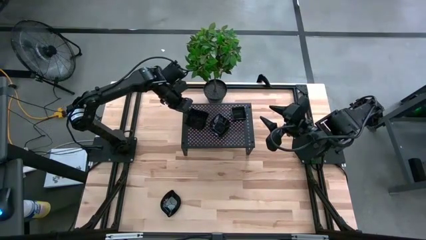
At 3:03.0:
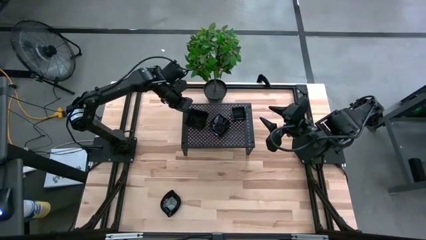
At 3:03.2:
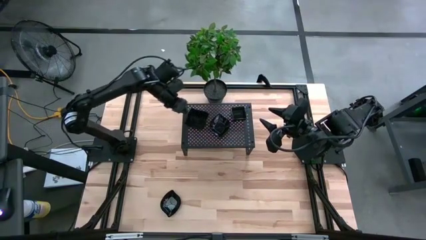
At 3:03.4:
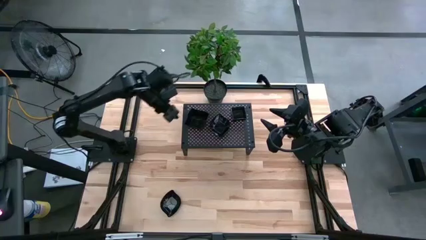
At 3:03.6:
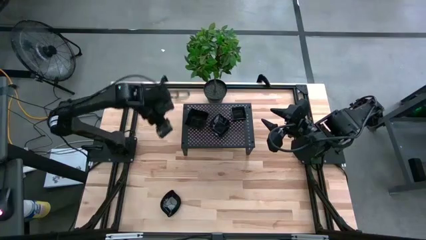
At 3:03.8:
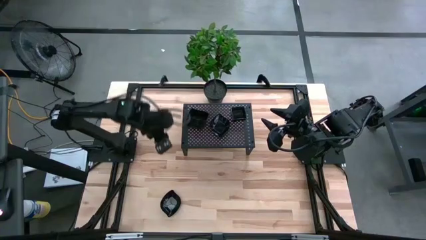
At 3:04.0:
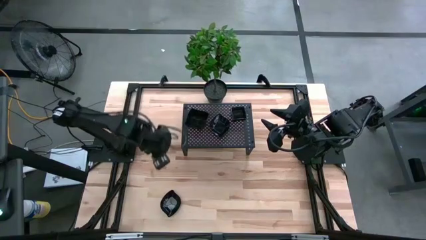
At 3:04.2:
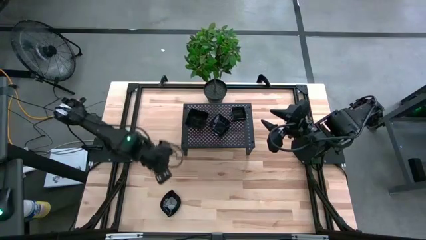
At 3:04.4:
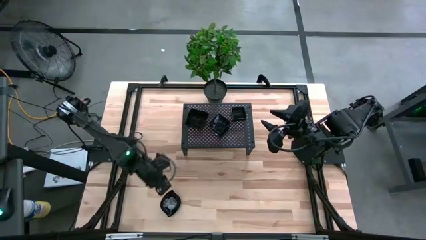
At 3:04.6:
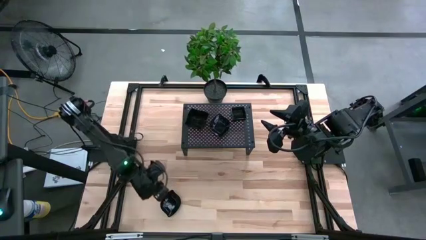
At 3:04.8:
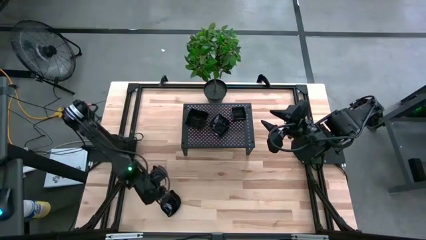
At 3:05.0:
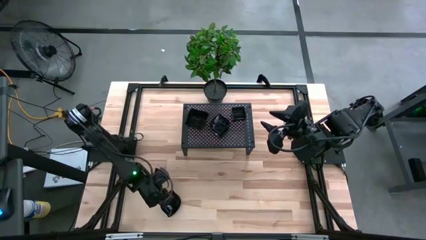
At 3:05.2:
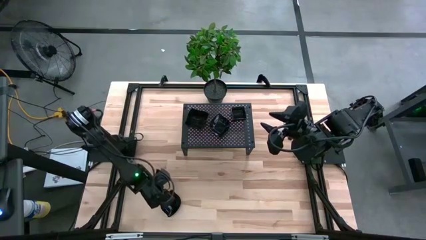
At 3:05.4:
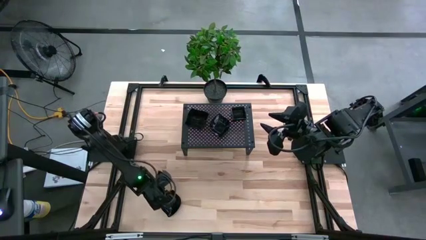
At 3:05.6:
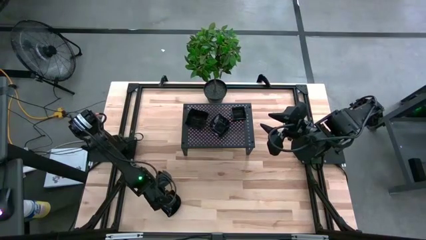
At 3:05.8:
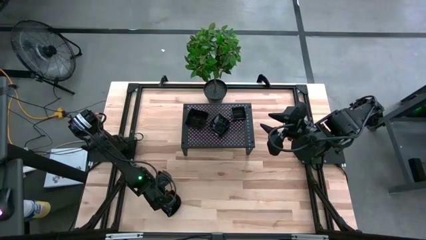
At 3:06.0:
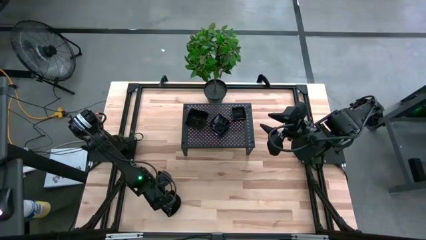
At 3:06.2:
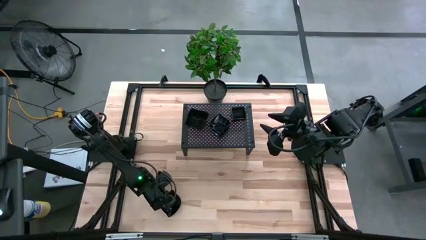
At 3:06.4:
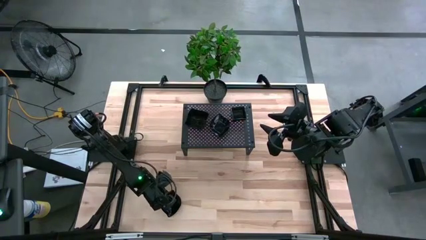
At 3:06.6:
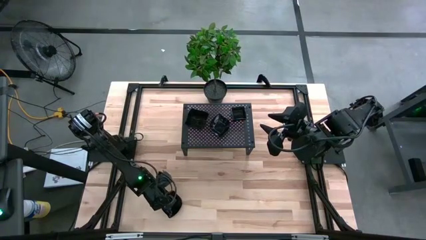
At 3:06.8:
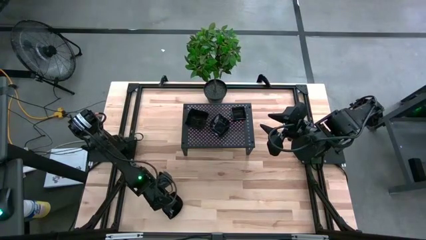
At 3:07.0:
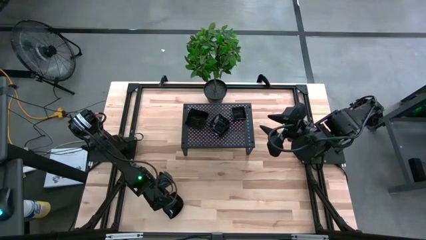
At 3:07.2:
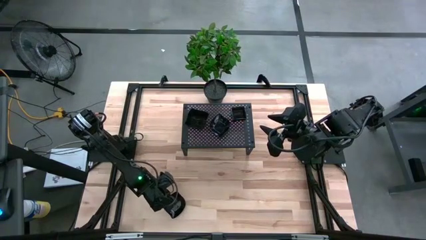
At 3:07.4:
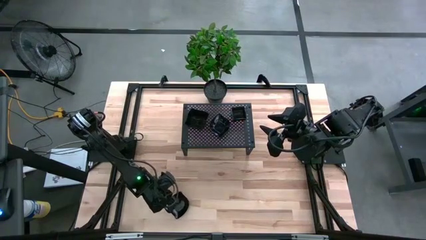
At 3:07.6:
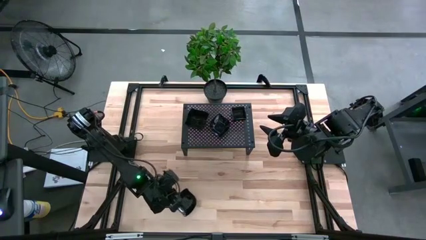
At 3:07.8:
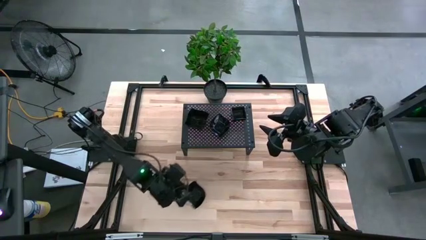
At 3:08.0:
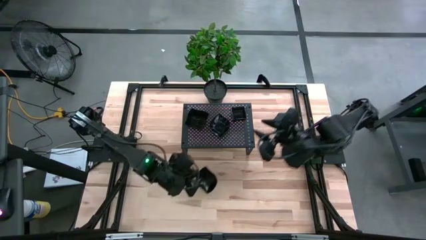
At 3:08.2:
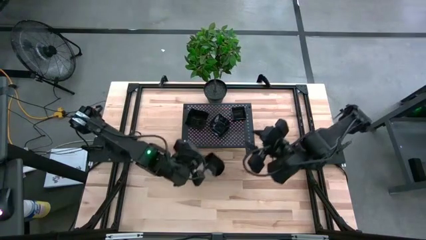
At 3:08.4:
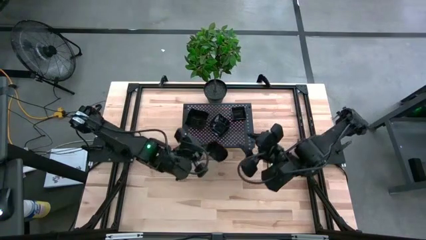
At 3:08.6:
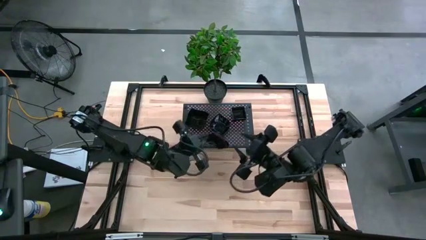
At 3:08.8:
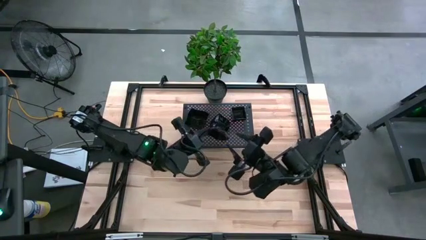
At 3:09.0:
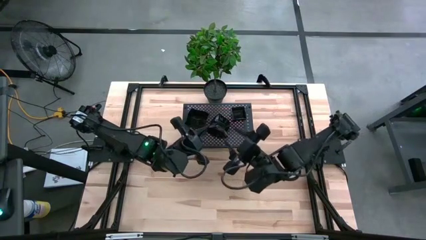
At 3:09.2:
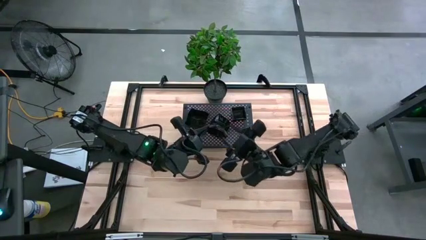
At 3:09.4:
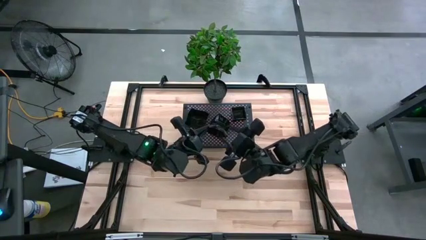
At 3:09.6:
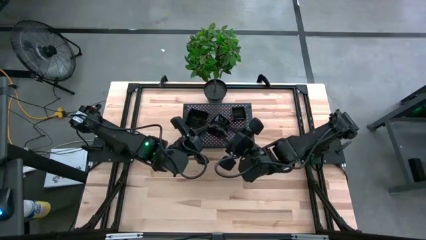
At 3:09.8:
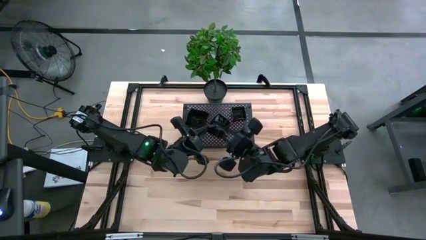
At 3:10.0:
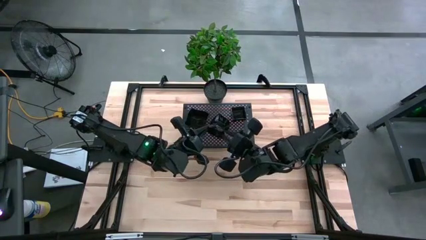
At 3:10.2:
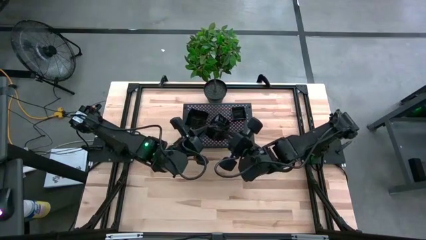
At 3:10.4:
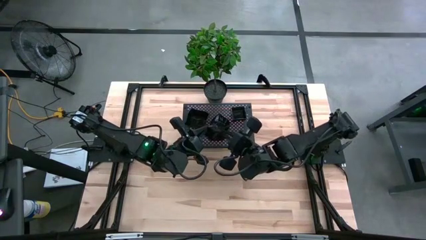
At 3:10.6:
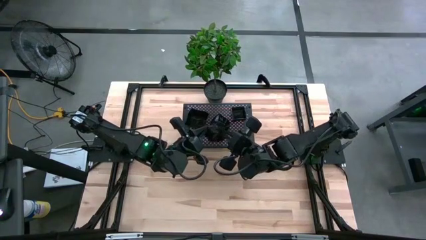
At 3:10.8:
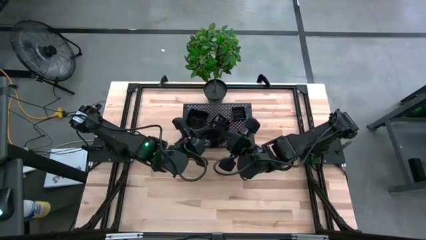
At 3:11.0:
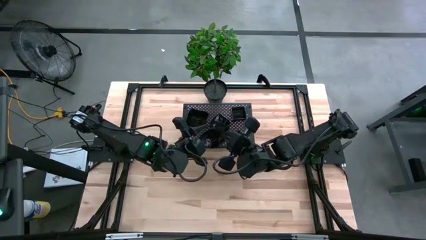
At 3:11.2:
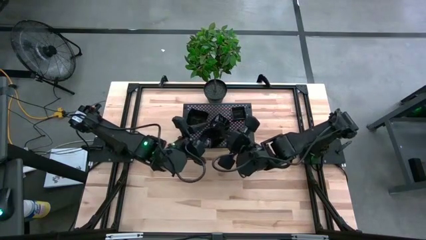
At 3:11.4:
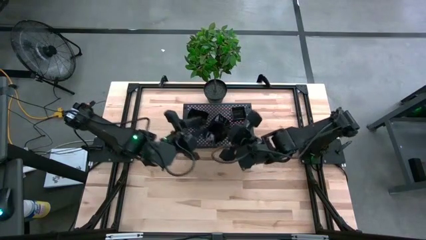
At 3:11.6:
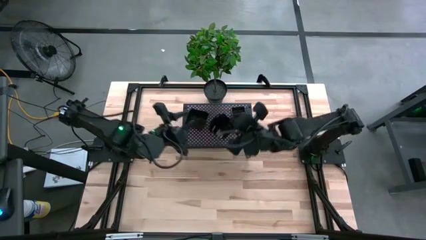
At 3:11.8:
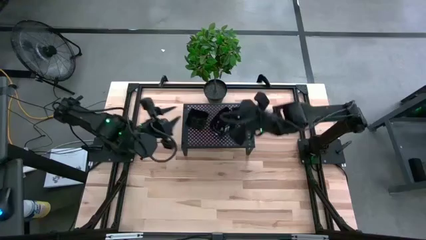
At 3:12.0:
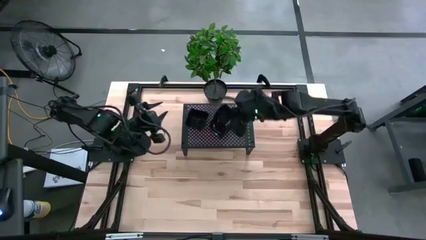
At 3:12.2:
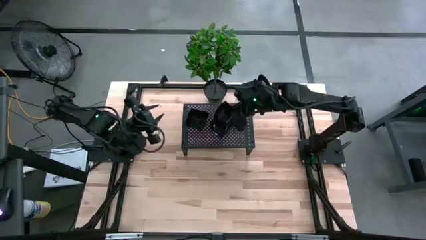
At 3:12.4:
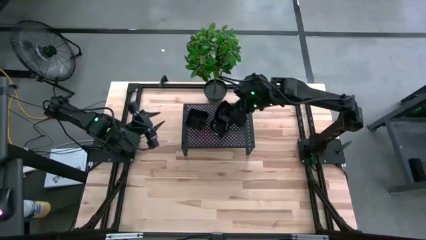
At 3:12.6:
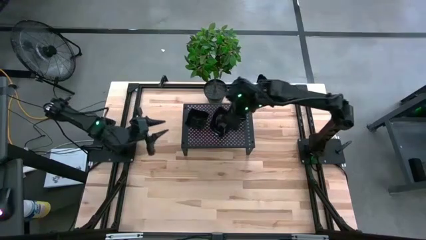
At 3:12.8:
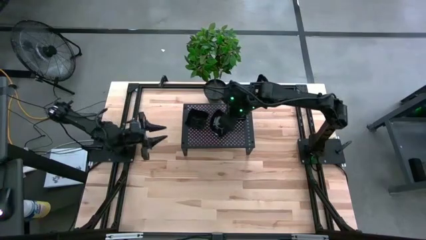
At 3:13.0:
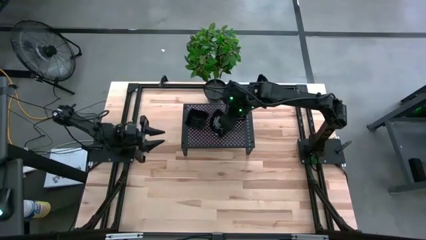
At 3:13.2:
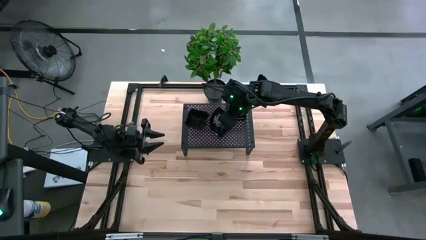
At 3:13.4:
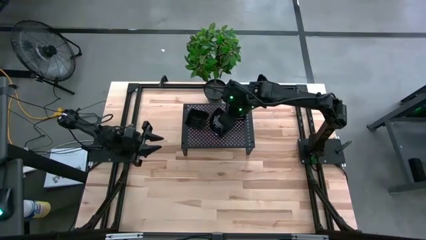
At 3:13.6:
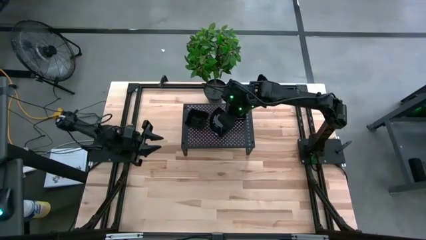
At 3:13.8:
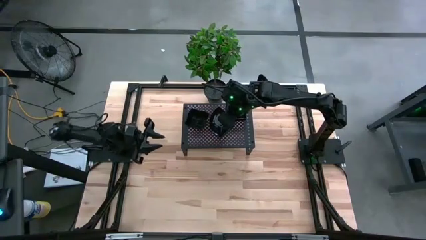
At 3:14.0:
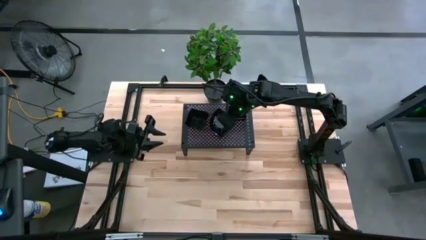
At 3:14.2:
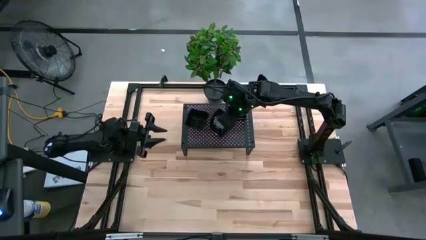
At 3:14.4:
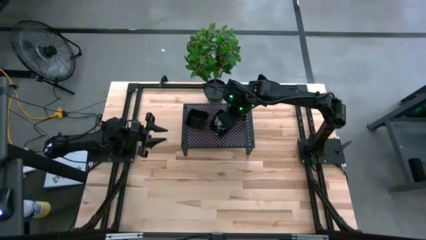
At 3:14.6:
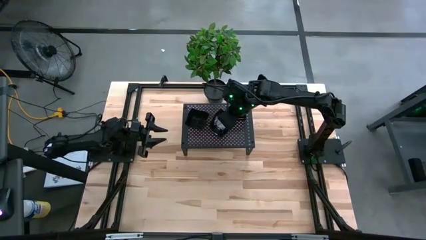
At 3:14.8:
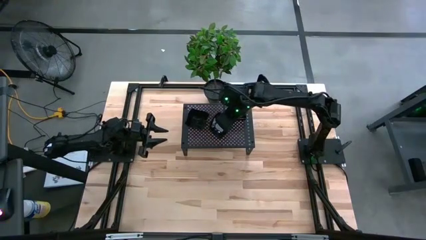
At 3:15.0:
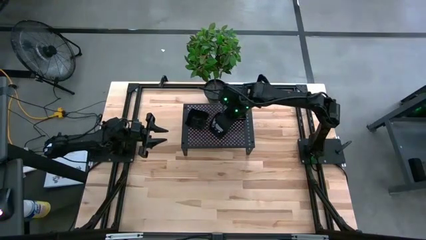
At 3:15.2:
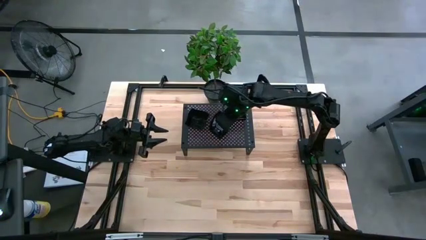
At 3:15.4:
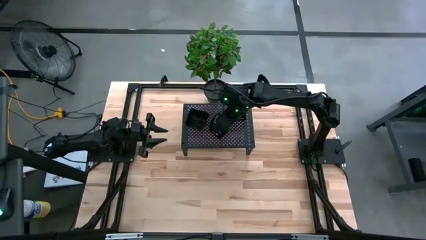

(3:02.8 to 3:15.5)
Task: Pick & Place Mini shaped plates
Stack the black leaf-shaped plate on top of the other black leaf-shaped plates on the shelf

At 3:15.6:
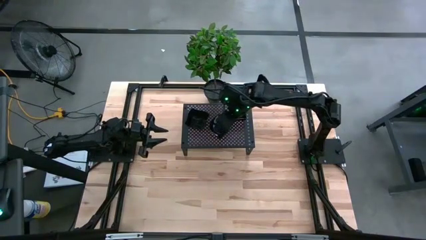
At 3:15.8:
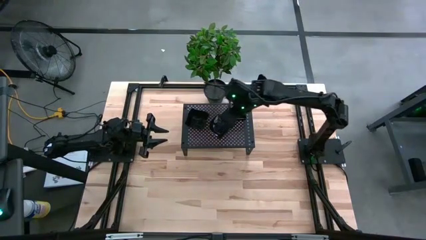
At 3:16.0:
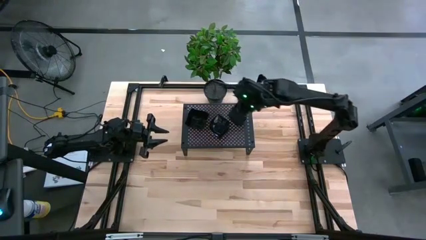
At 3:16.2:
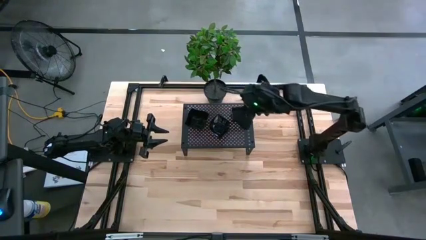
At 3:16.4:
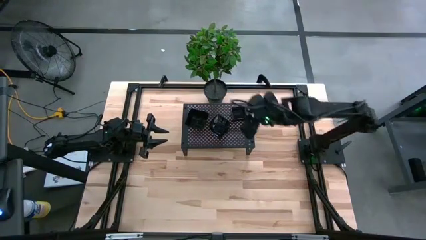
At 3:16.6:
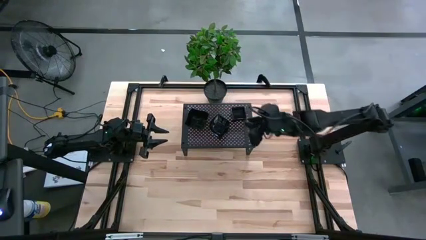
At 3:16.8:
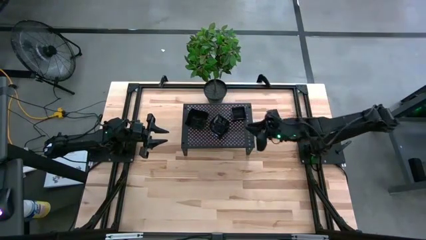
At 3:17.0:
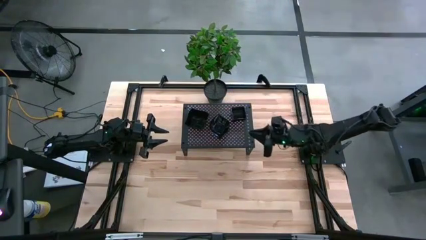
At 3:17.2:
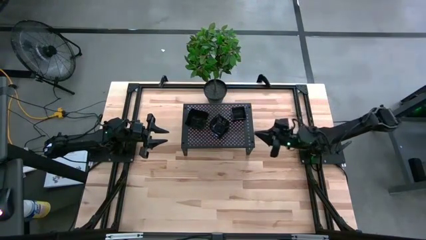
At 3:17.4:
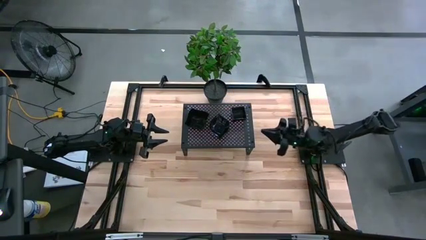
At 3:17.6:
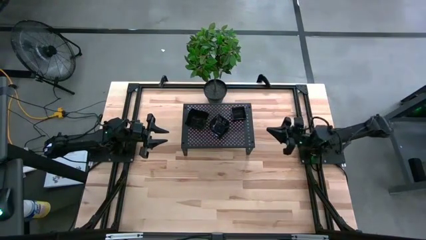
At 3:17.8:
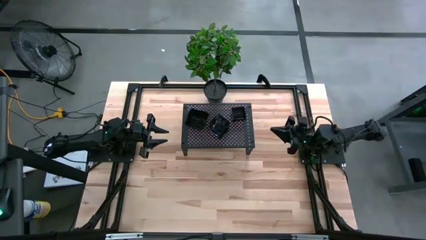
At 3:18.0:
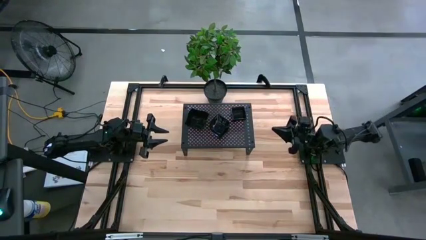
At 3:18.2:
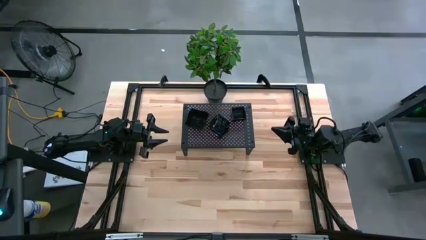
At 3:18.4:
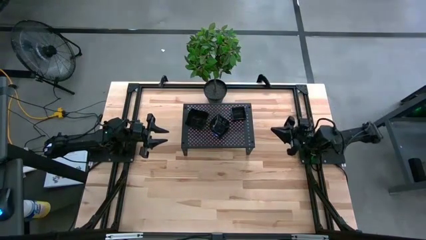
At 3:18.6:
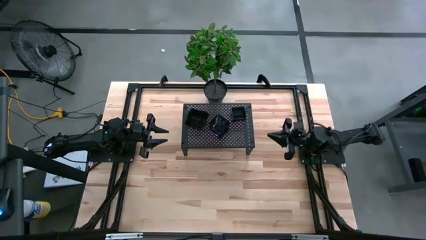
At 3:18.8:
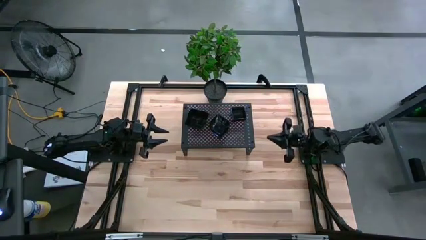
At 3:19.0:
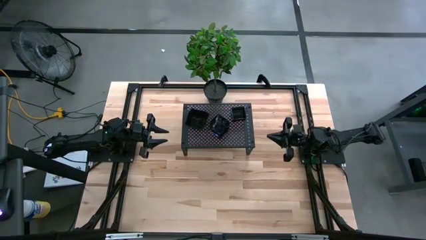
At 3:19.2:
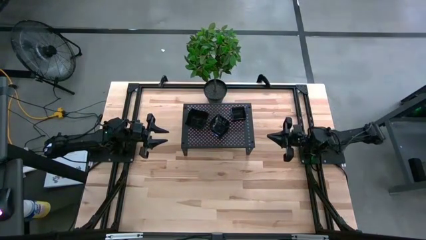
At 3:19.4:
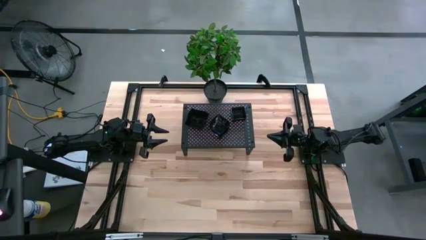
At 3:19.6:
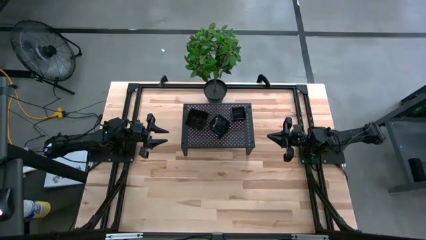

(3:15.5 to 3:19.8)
Return to Home Position
